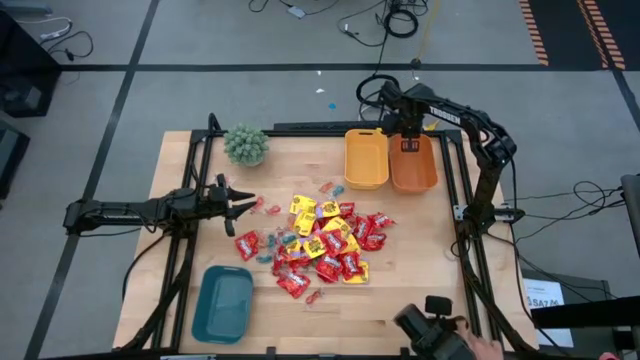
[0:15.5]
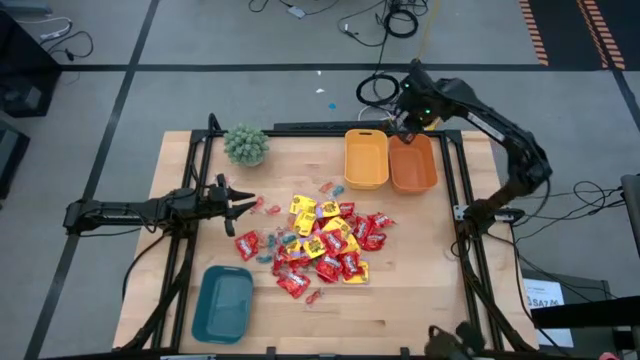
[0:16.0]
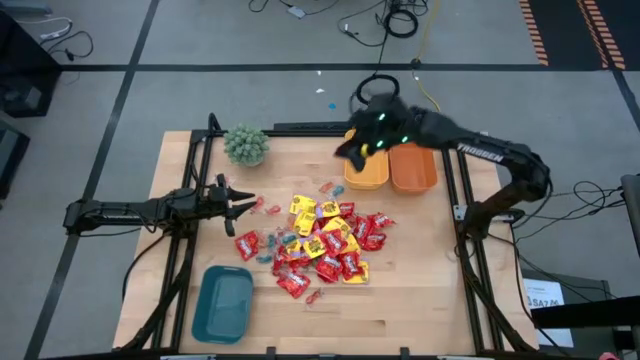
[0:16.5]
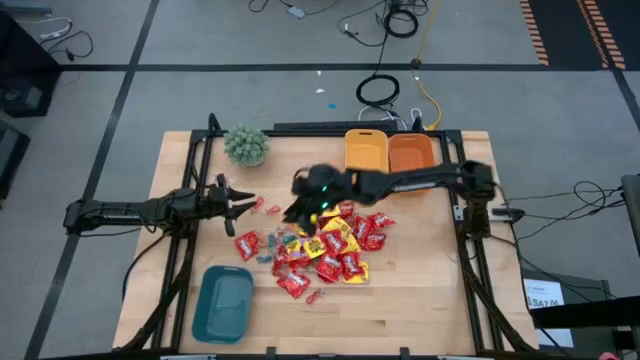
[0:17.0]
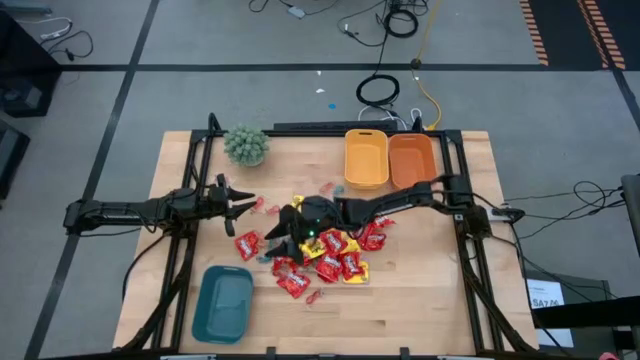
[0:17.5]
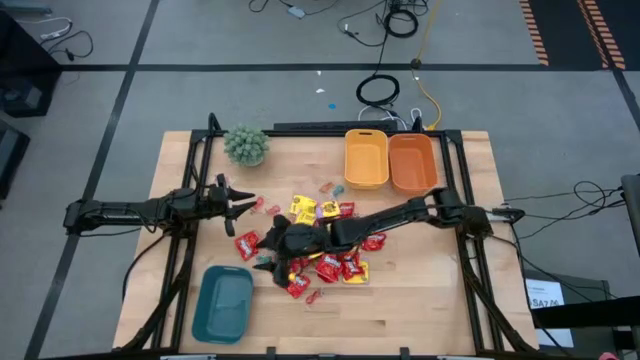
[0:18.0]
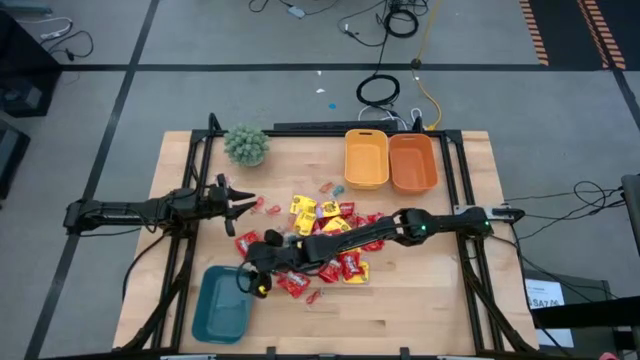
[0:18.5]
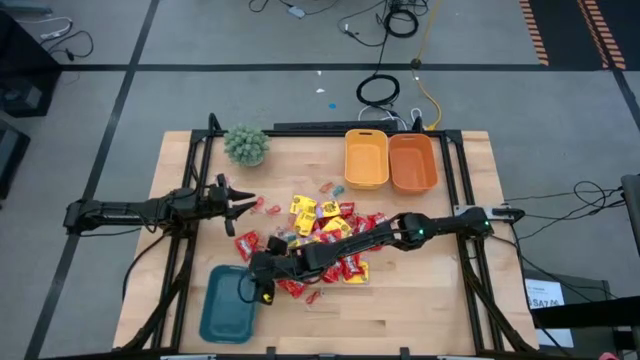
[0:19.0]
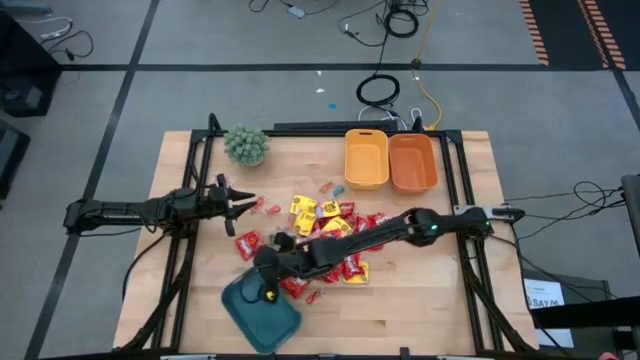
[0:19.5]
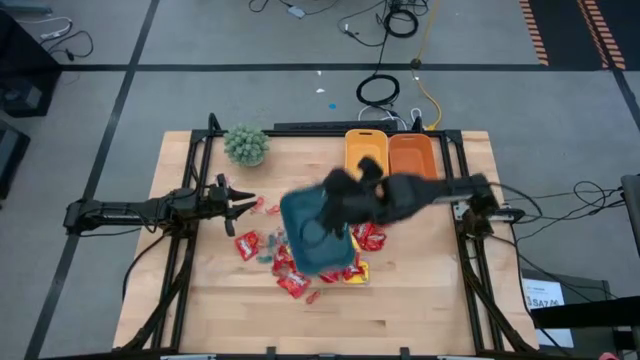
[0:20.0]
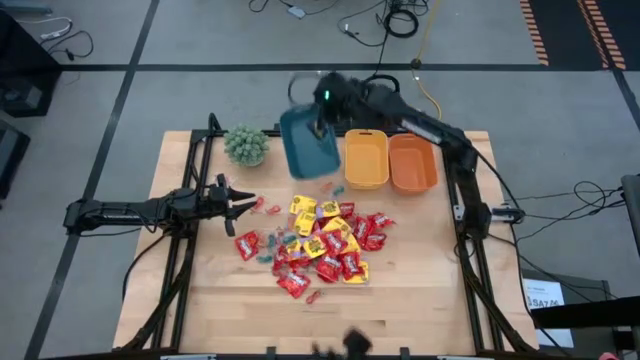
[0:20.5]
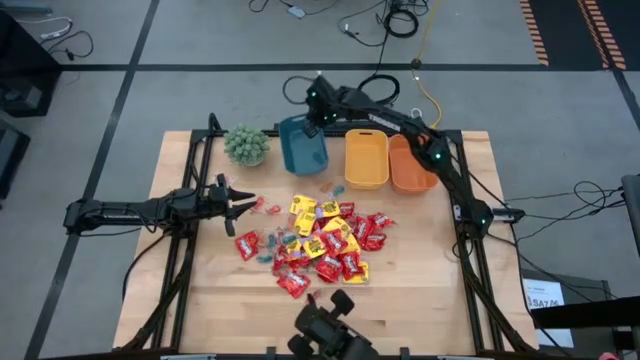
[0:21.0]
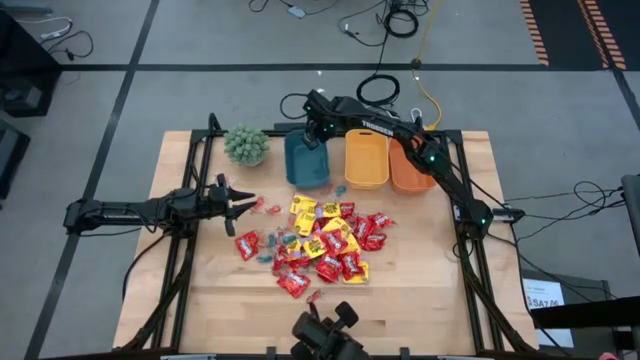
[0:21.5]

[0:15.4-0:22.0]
Task: Sort candy
Move the blue bin to the right side of the yellow bin

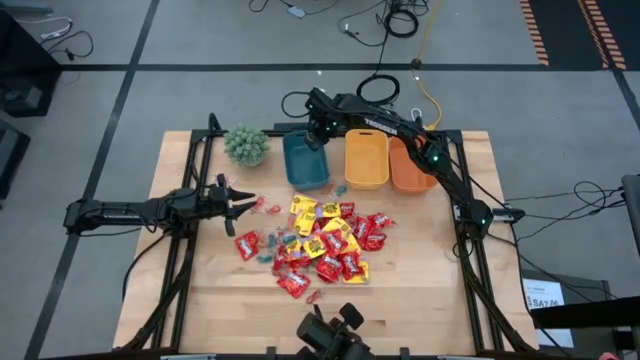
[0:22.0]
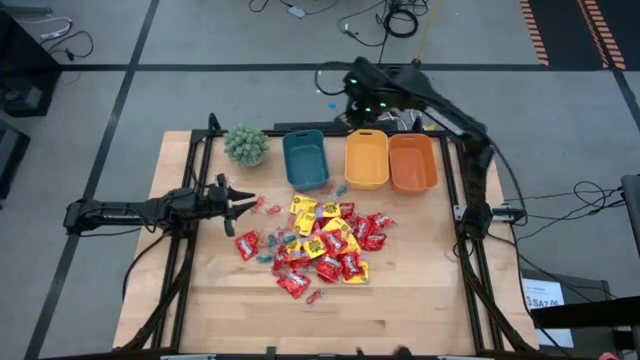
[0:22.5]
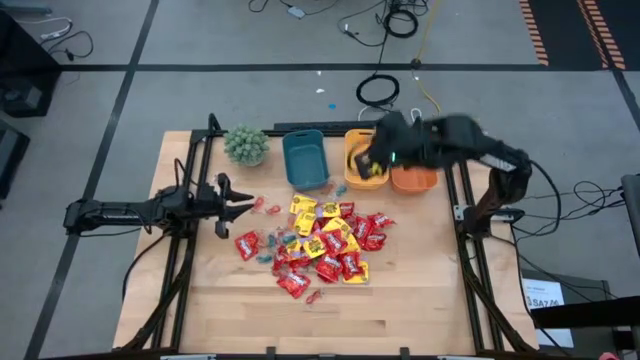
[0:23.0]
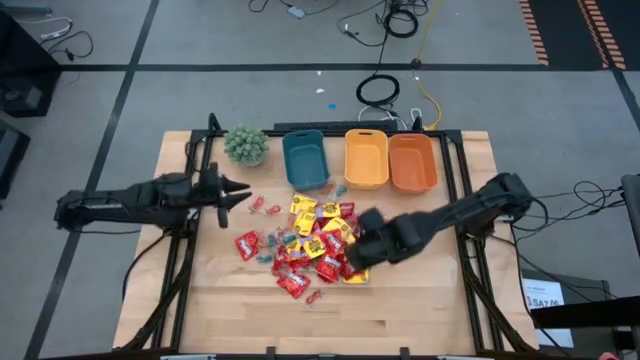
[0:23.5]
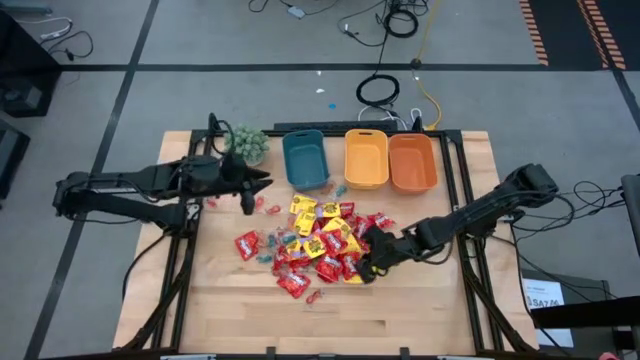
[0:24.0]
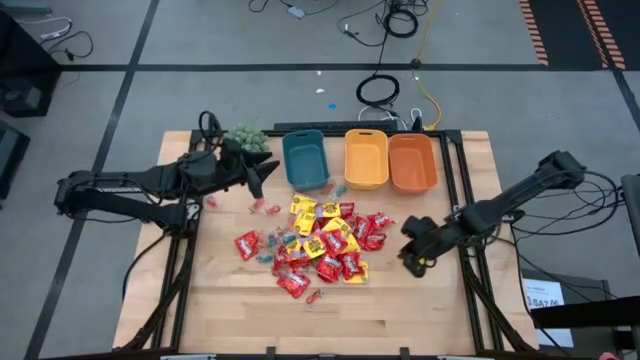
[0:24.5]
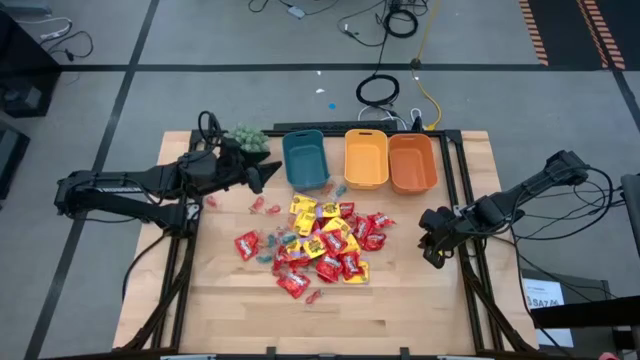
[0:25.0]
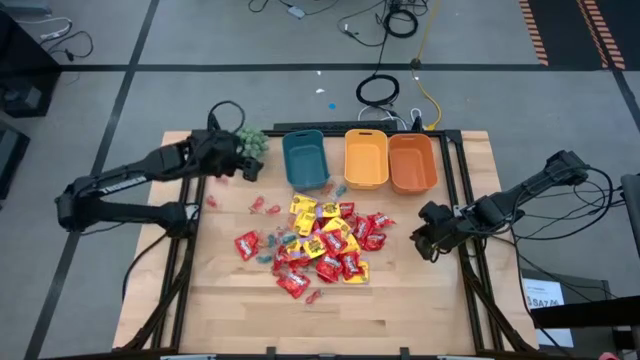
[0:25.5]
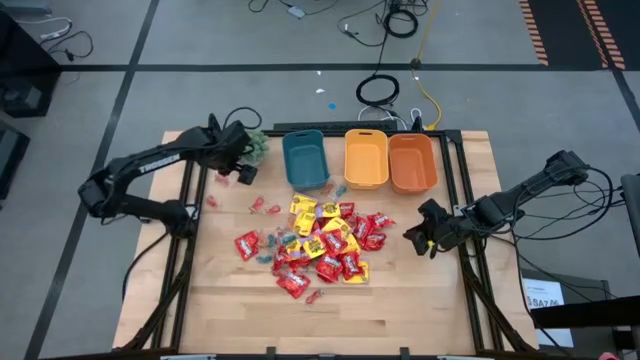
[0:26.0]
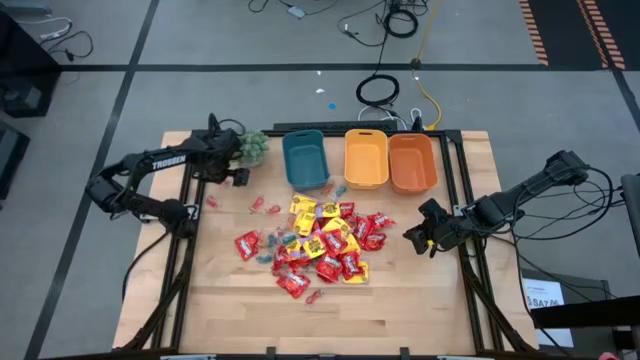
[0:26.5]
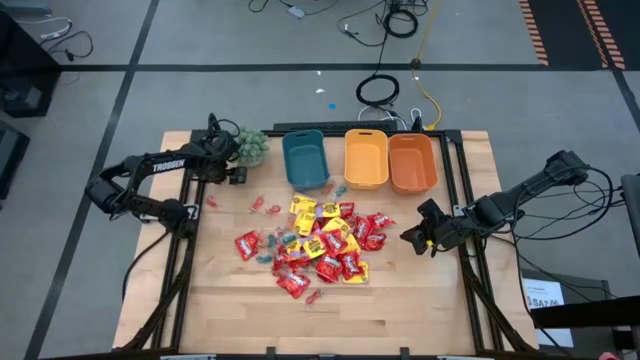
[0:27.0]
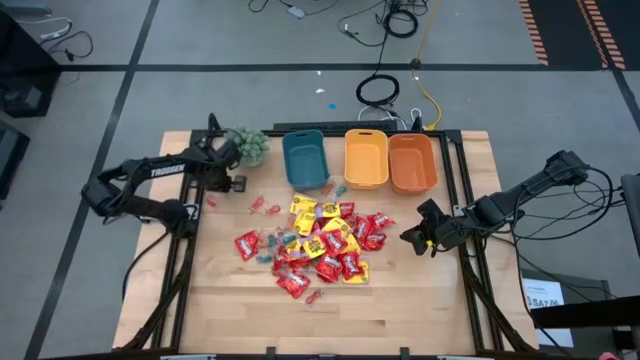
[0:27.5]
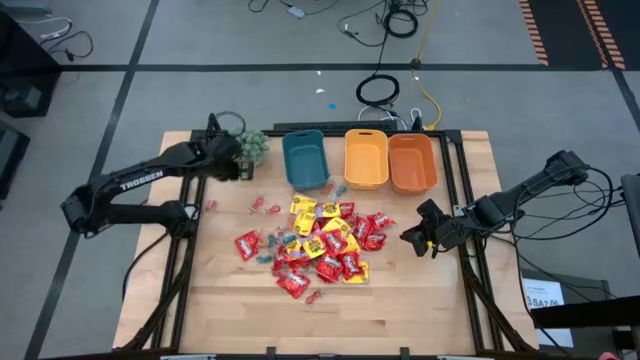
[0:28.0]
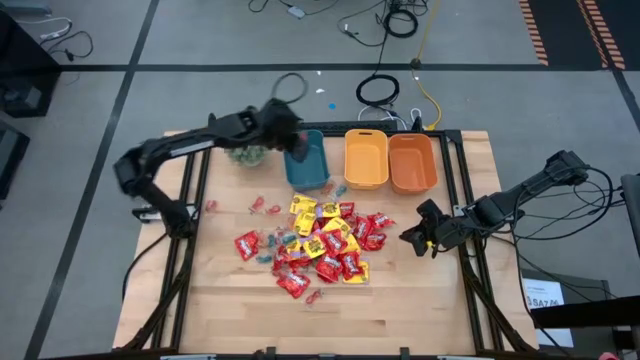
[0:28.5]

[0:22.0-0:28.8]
Put the orange gummy into the blue bin

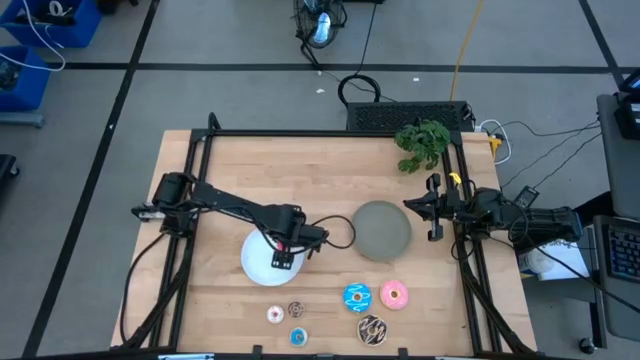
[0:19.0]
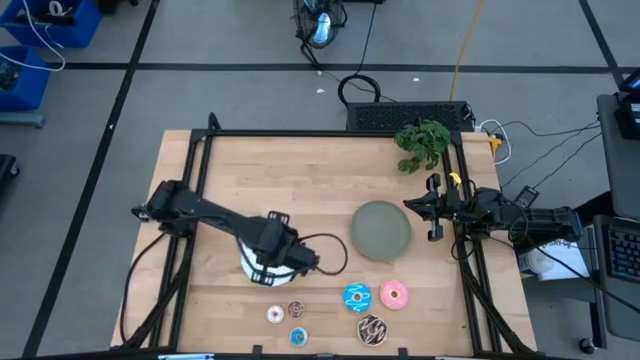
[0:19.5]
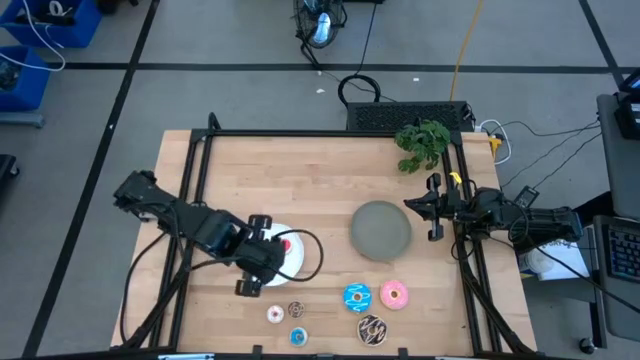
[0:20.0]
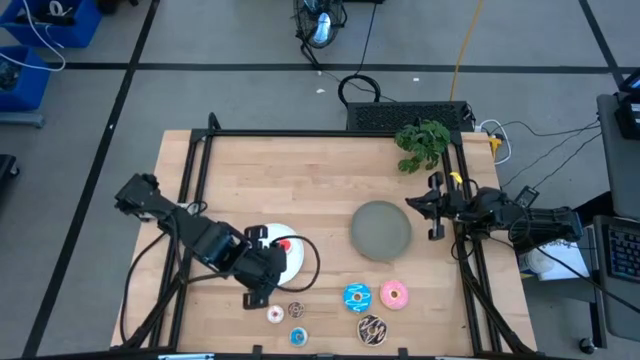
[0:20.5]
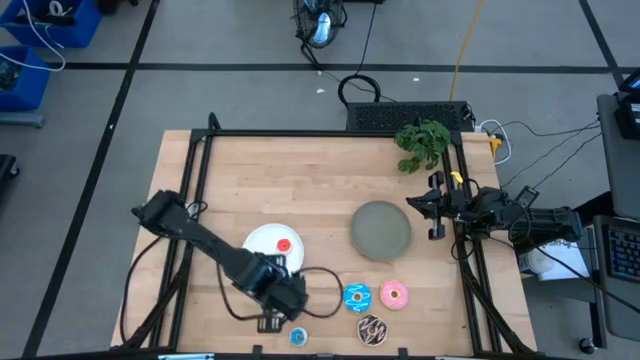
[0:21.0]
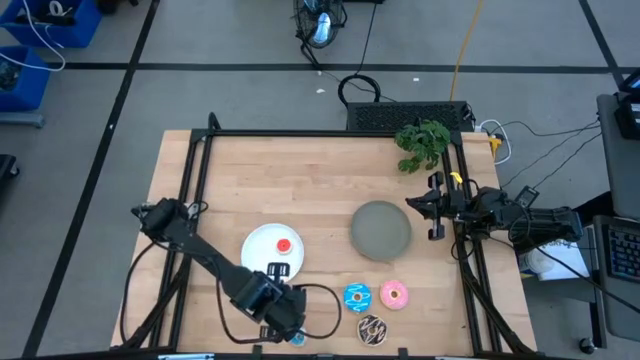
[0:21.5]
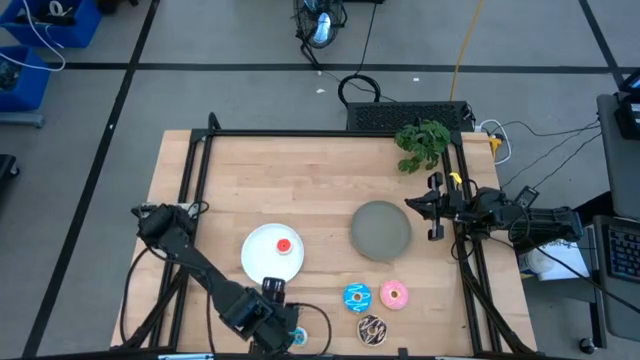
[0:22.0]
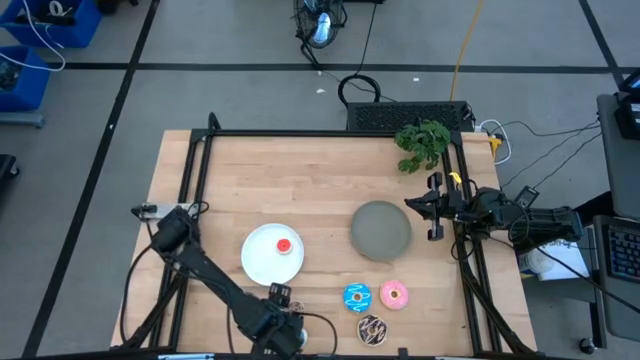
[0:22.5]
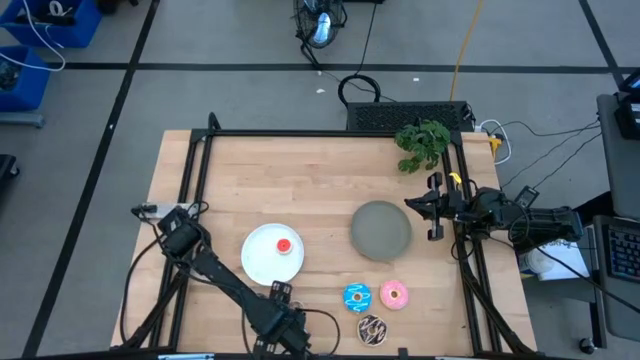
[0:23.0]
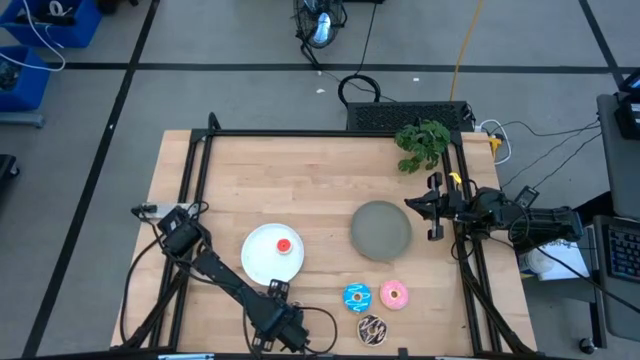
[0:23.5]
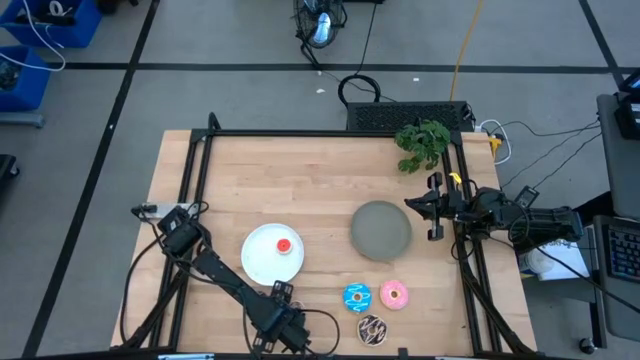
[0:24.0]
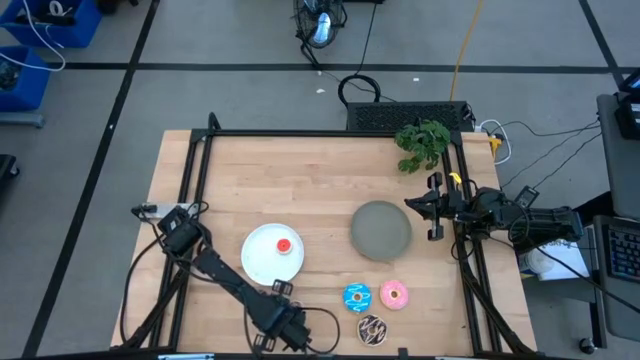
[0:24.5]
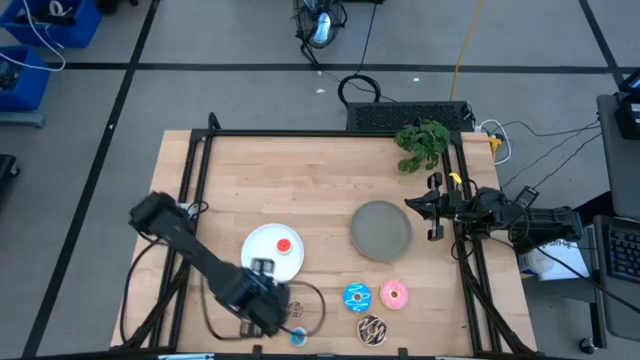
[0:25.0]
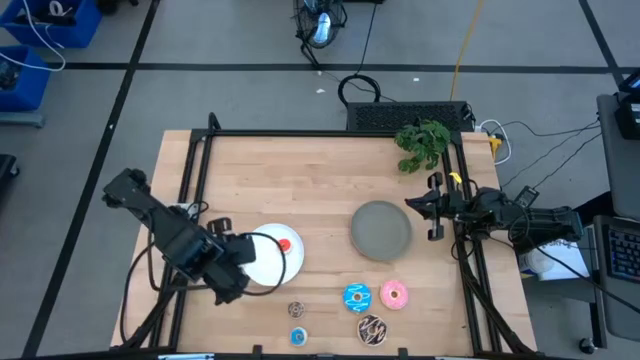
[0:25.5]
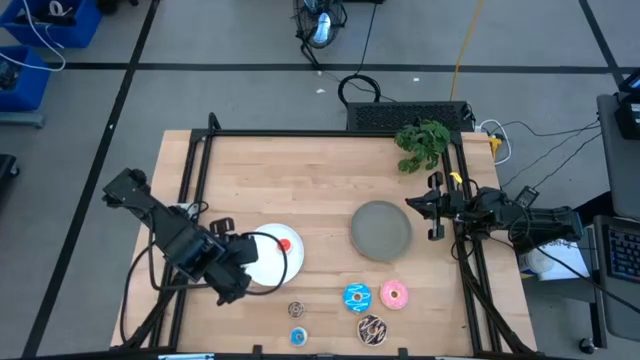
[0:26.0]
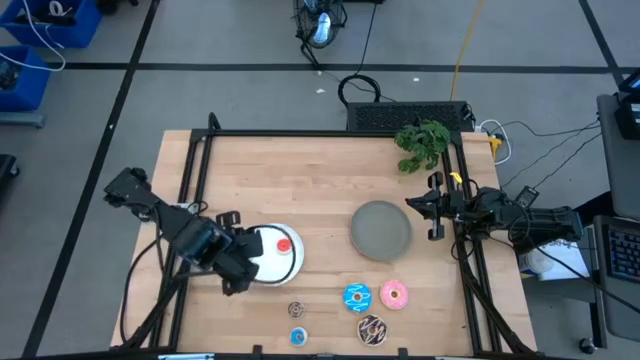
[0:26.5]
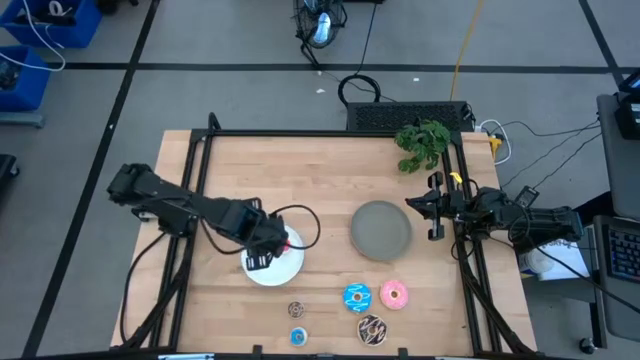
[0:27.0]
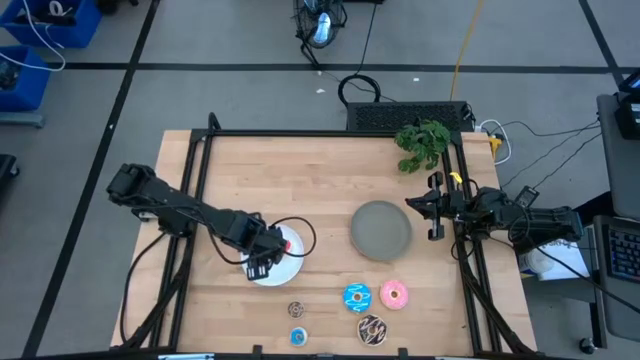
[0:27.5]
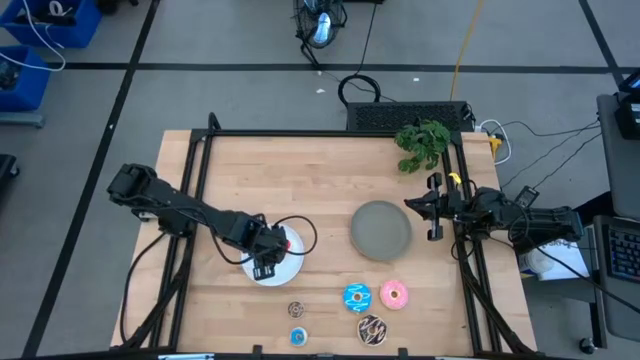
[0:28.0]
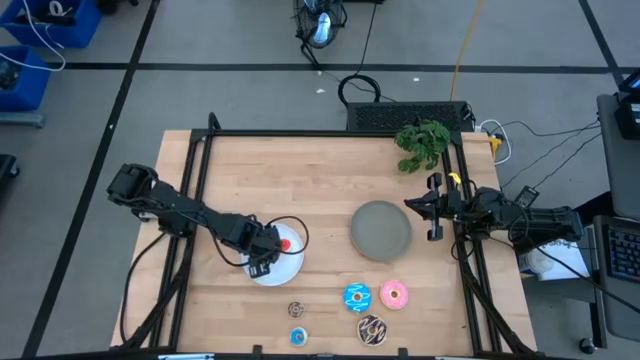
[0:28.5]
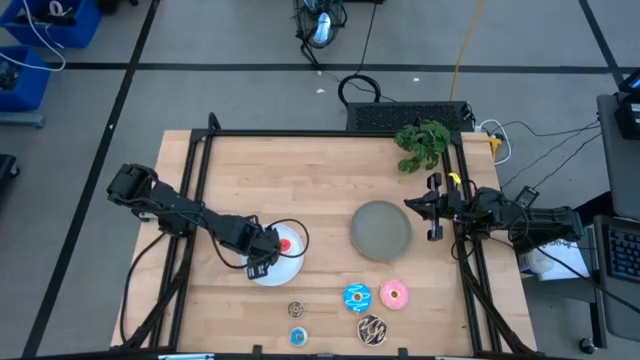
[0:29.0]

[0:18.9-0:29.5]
Task: Pick & Place donuts
Put the small white donut on the white plate
